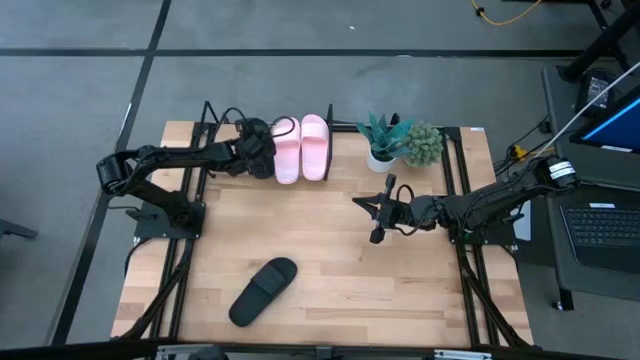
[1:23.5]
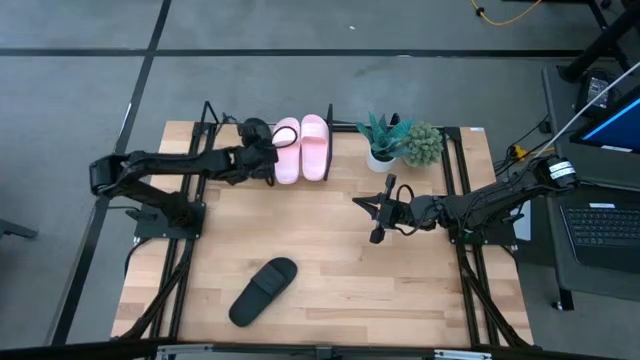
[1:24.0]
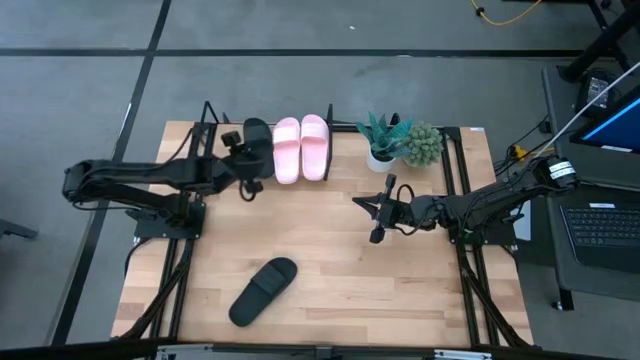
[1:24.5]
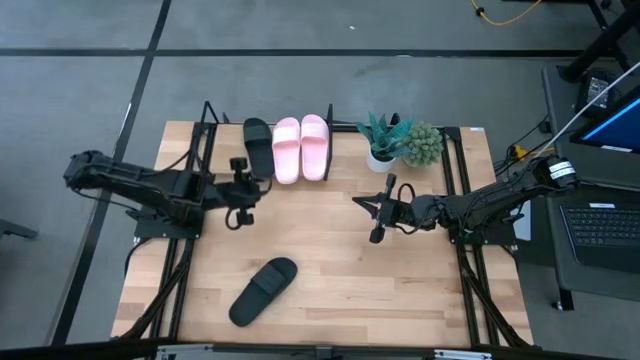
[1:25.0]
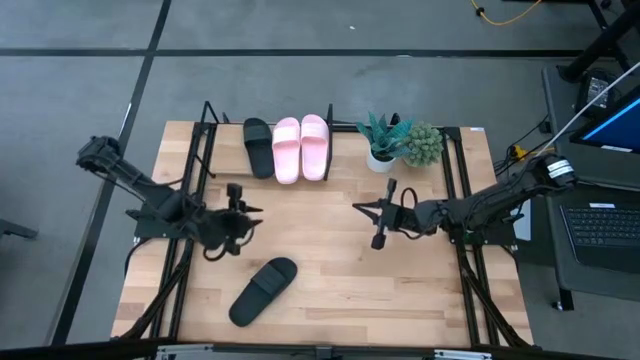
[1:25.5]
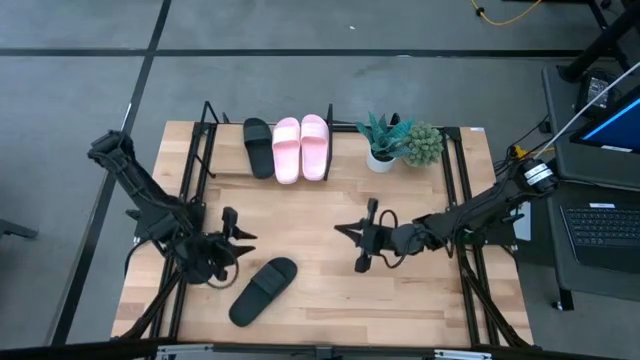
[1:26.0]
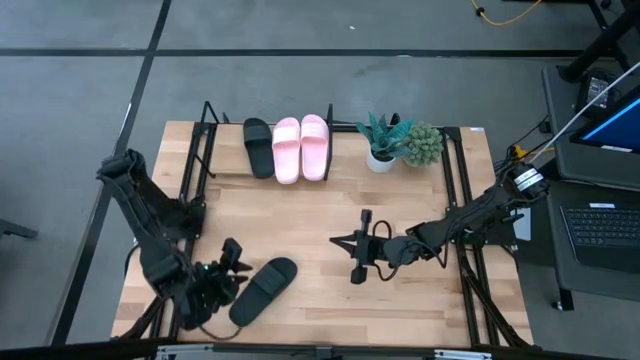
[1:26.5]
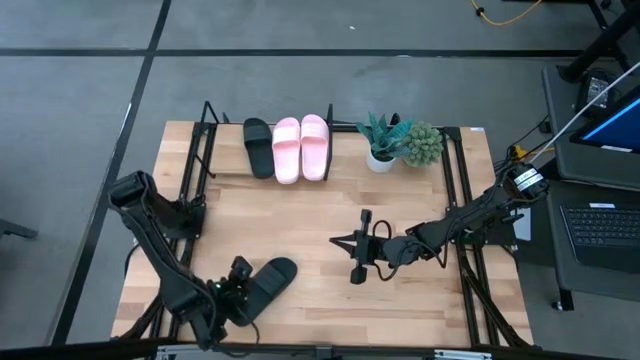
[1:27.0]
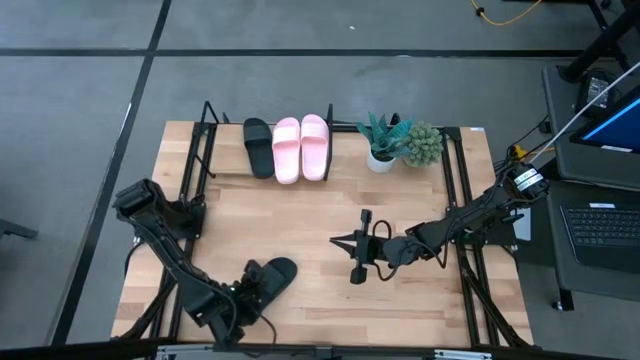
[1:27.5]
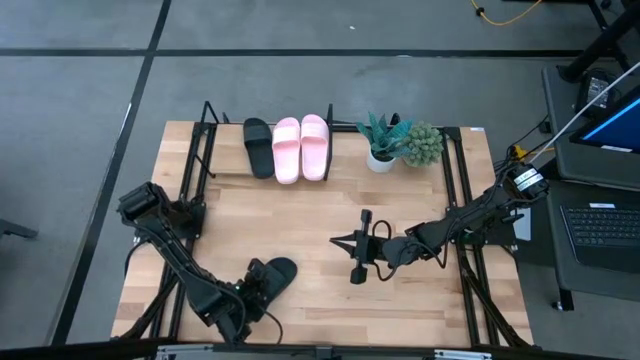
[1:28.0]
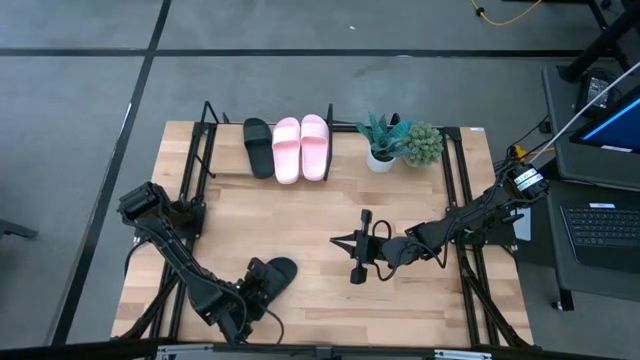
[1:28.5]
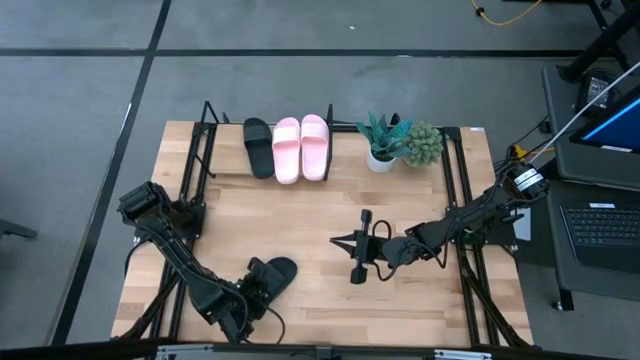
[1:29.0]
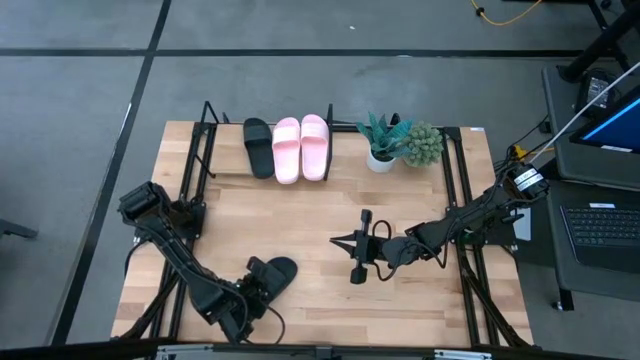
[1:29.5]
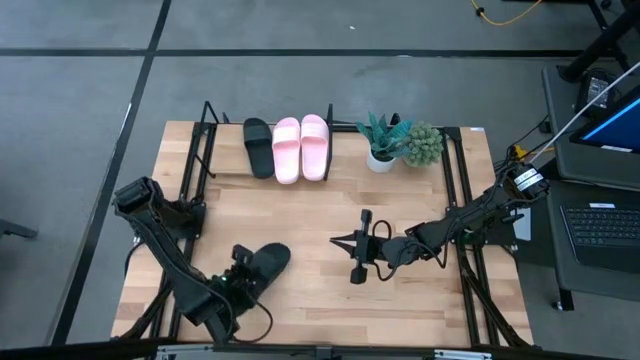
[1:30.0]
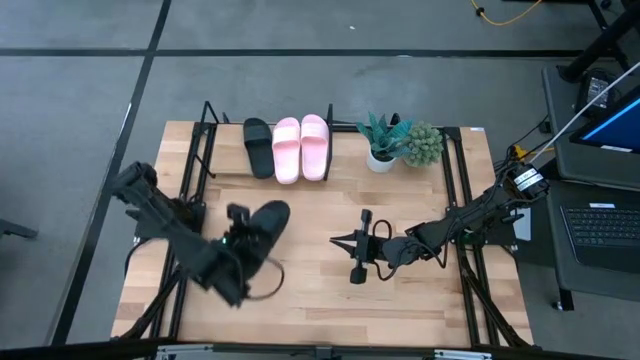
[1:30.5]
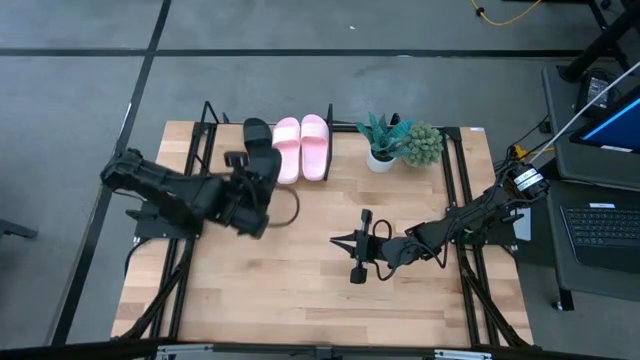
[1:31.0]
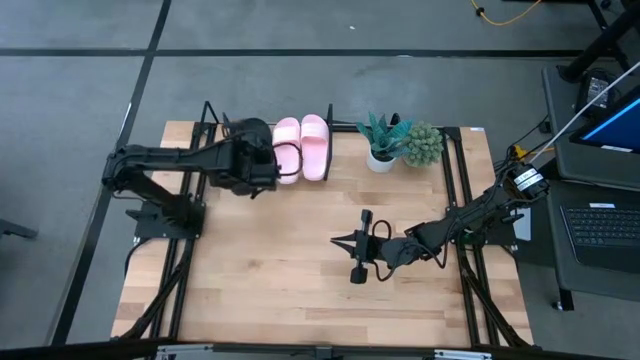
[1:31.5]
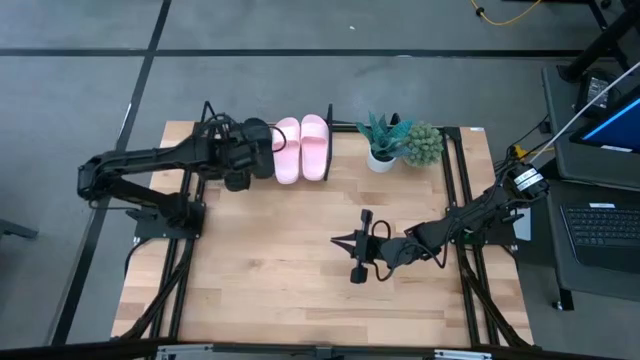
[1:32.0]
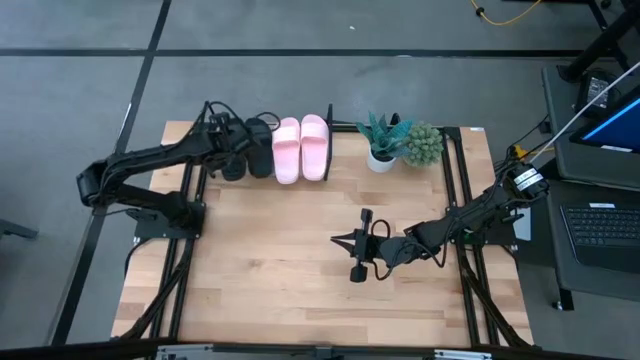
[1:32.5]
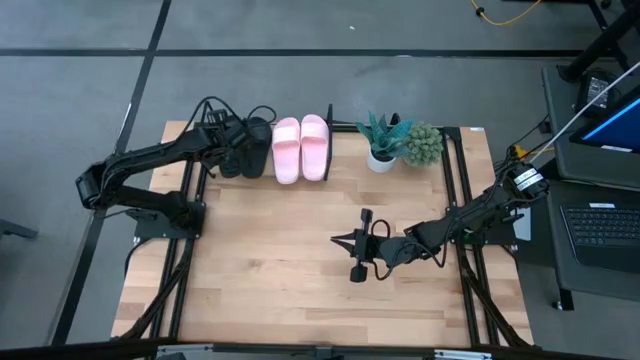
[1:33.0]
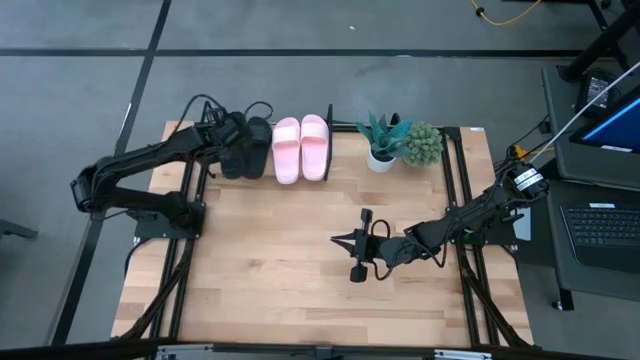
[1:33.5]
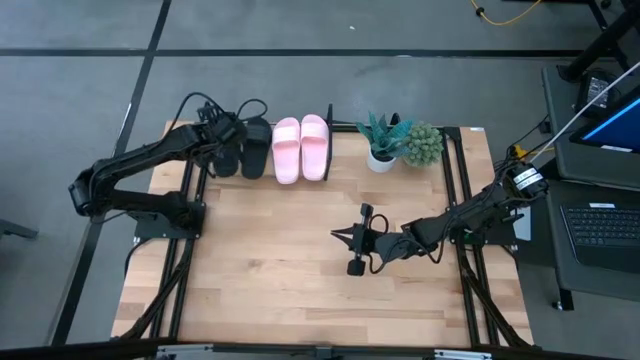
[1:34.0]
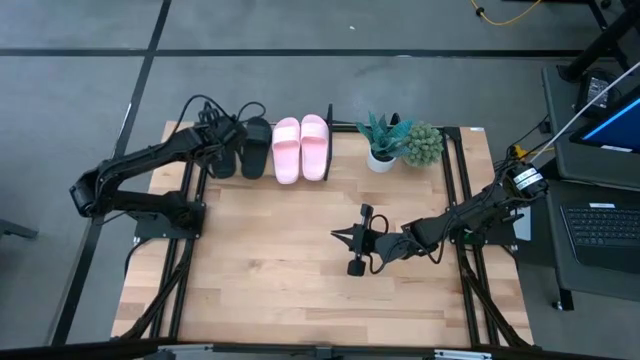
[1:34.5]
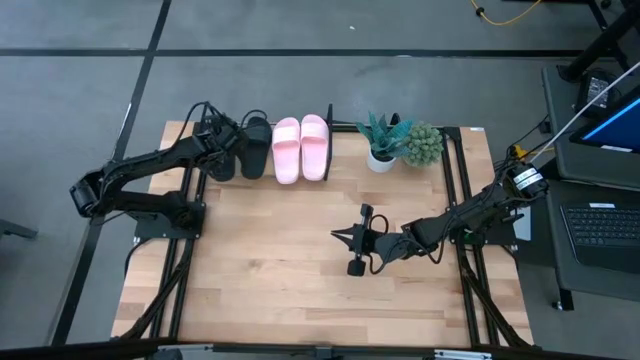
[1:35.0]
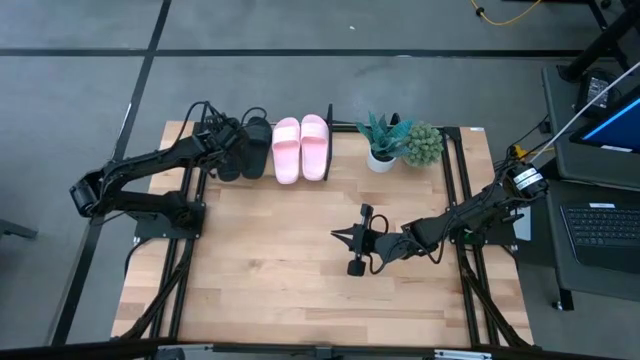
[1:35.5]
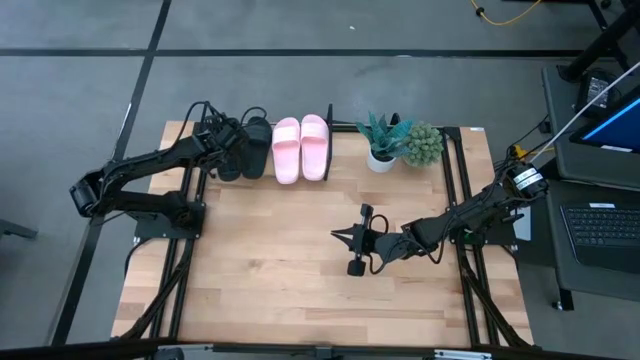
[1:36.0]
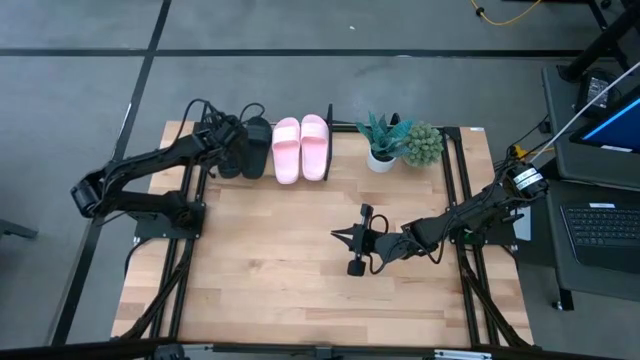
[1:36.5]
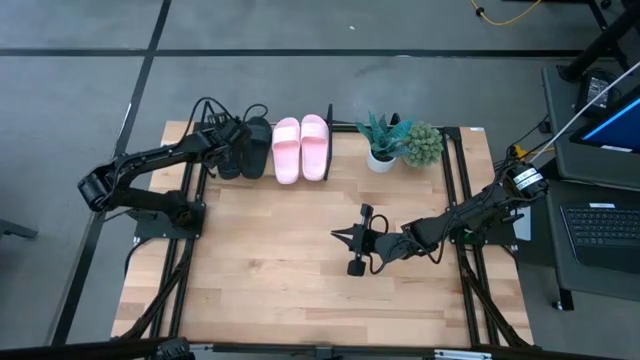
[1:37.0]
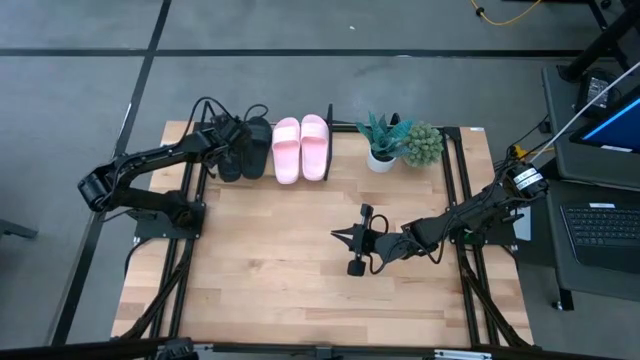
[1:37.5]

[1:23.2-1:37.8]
Task: Pick and place slides into the shelf
Put the black slide on the shelf

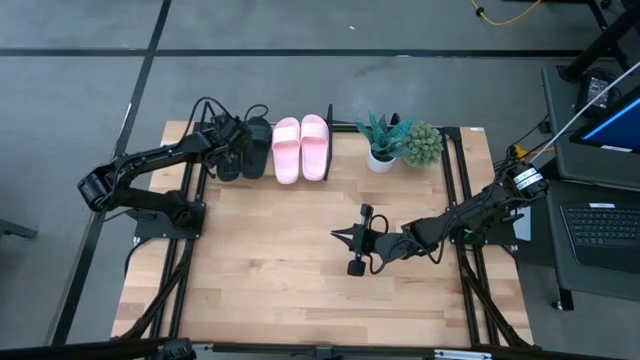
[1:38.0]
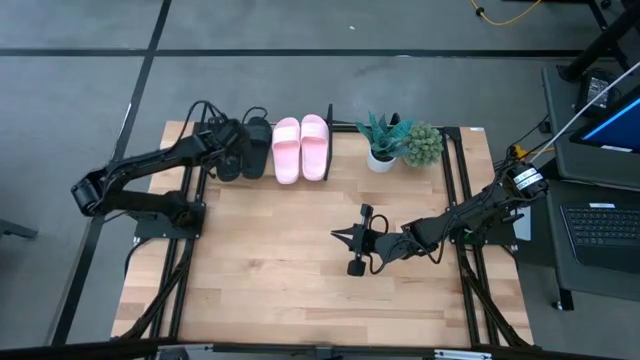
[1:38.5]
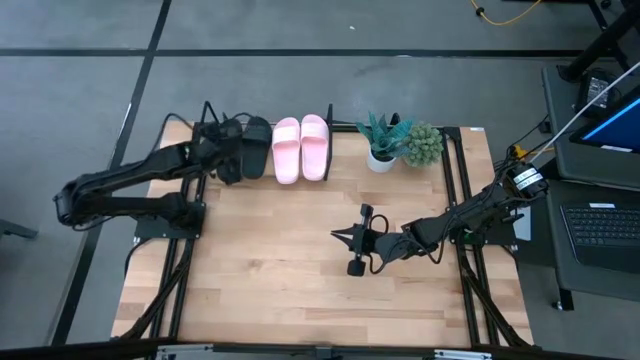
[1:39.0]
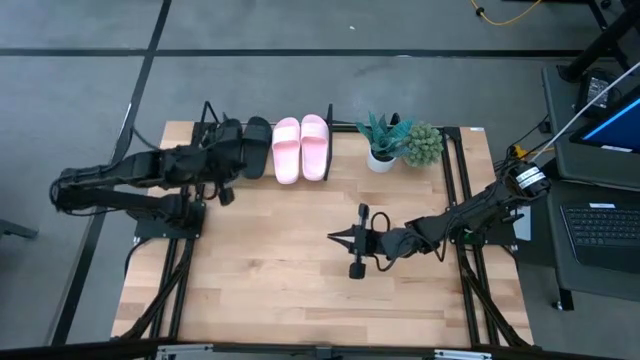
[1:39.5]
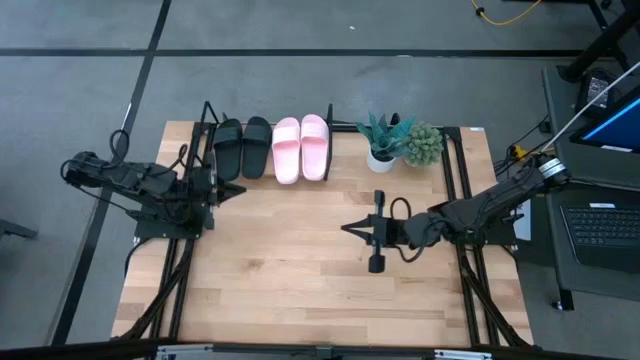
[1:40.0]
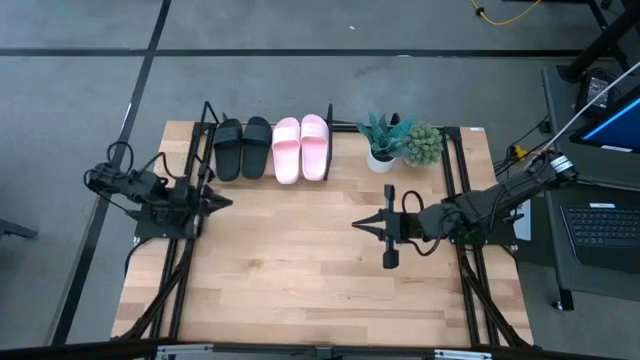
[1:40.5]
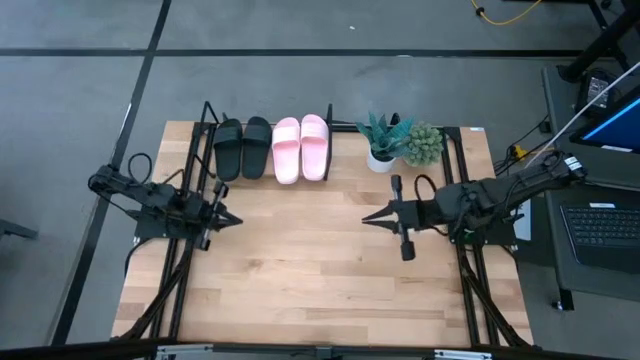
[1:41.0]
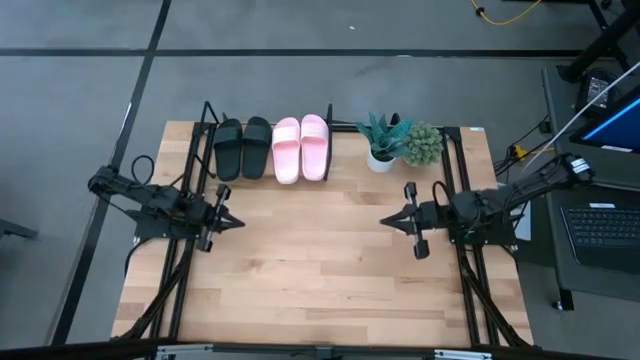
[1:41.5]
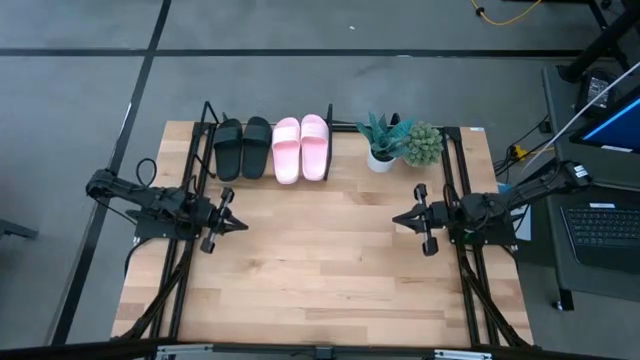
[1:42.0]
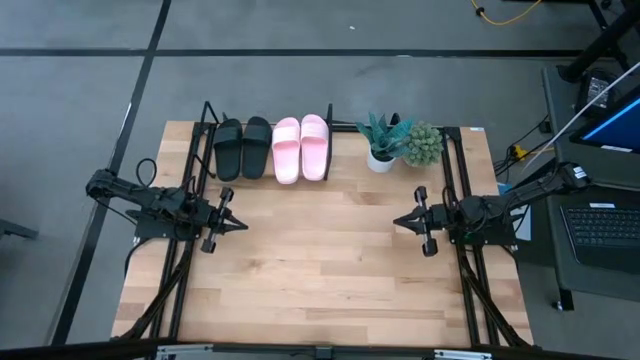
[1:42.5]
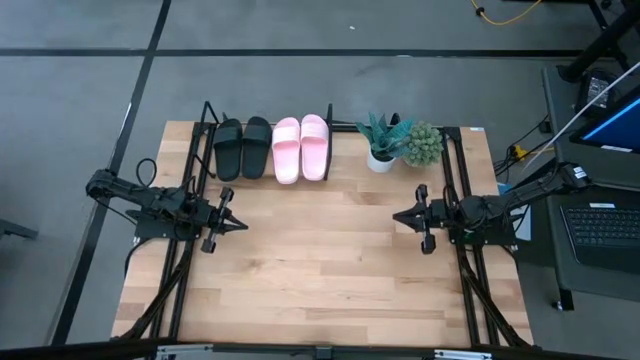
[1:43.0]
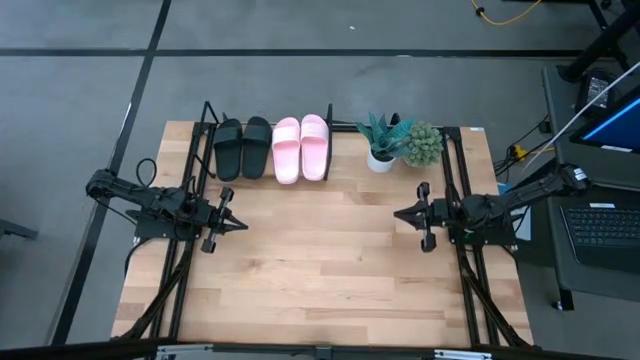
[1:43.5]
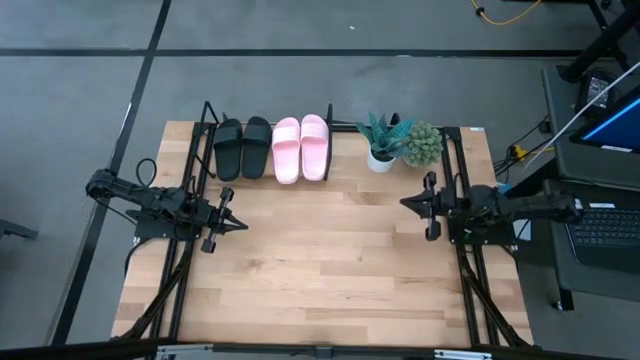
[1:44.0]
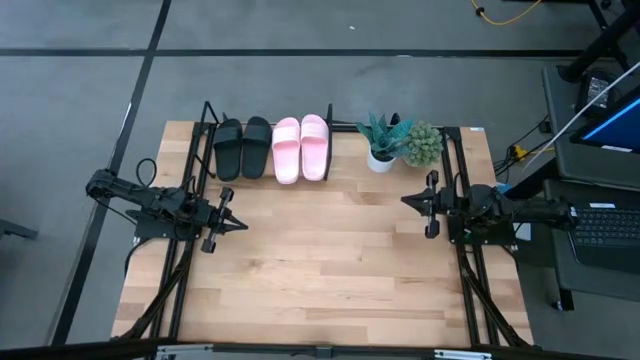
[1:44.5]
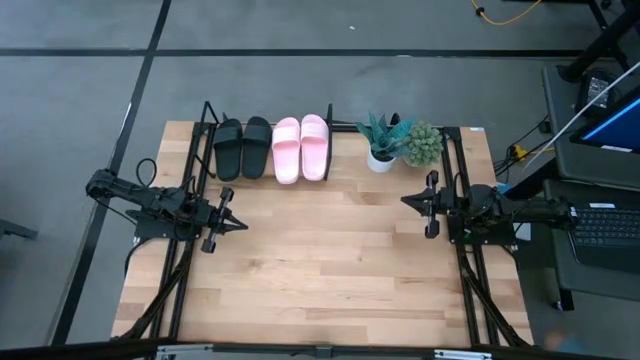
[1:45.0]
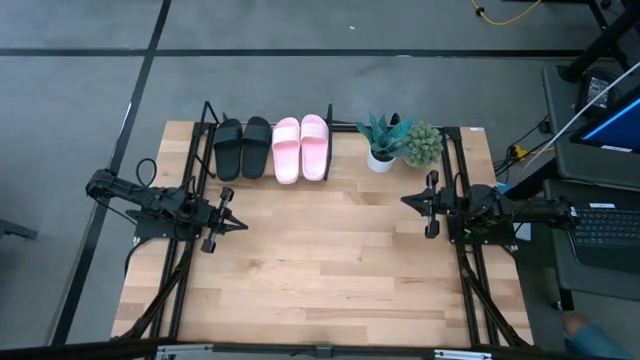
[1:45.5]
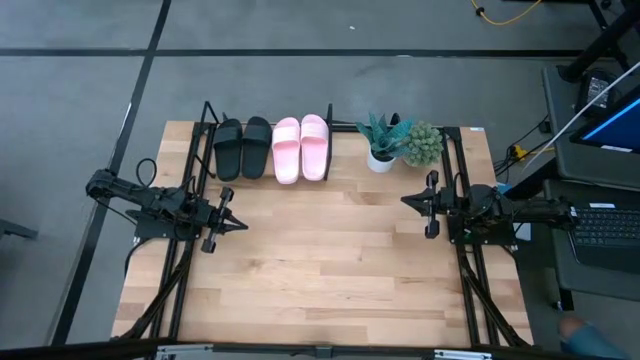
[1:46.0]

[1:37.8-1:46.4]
Return to Home Position
